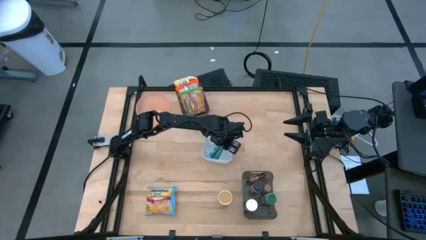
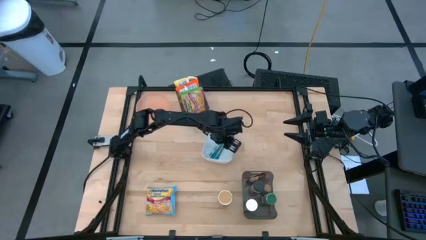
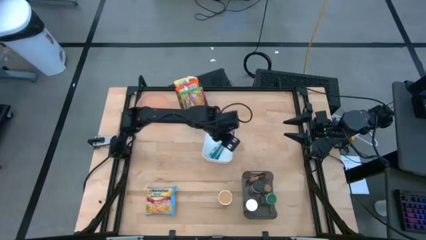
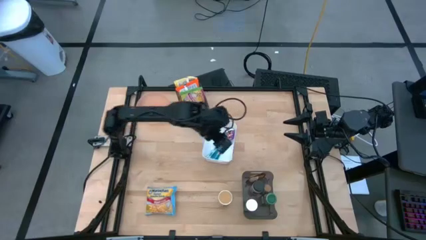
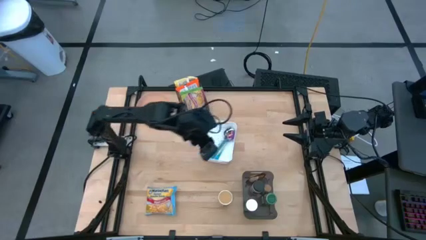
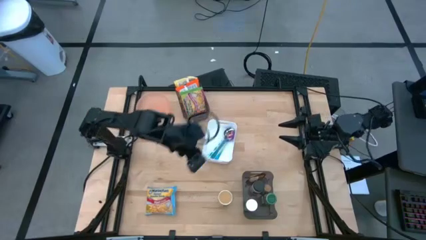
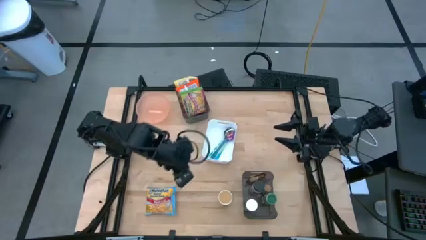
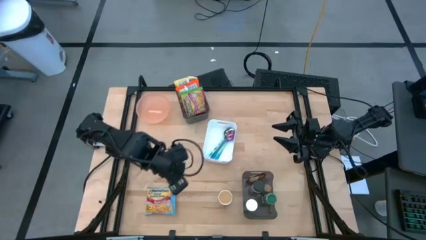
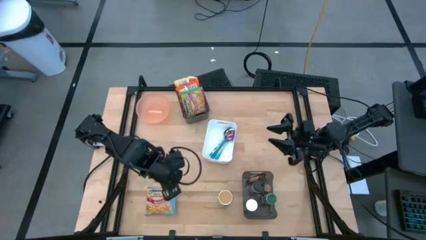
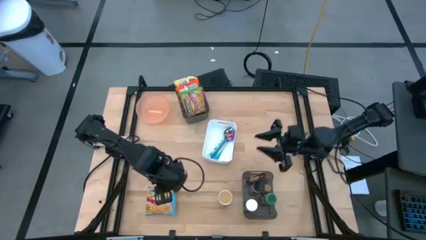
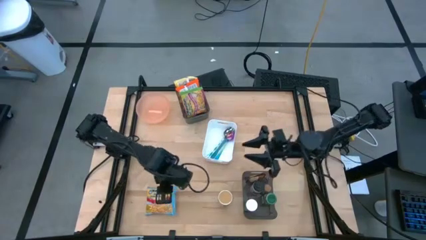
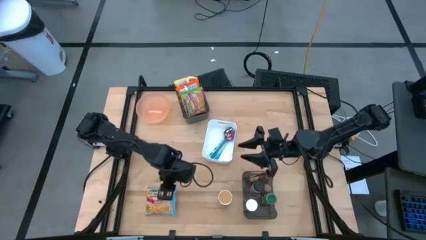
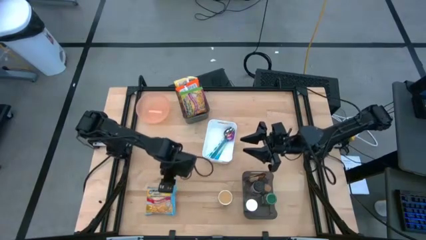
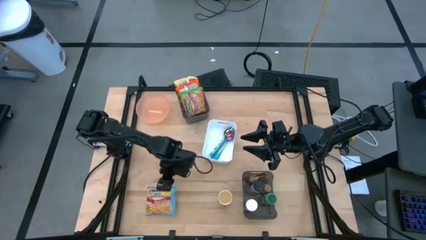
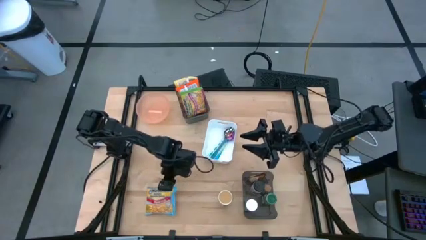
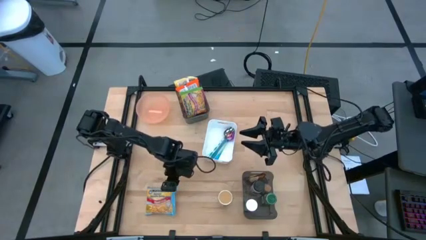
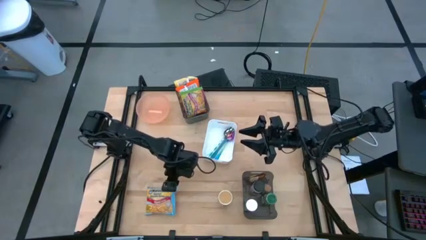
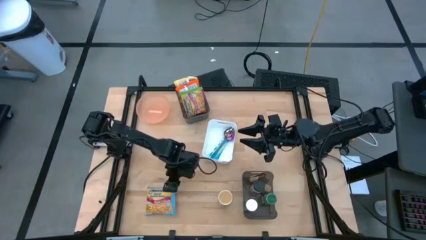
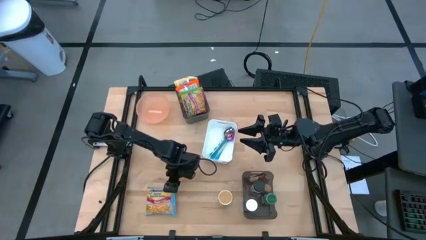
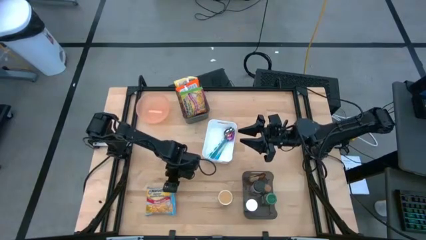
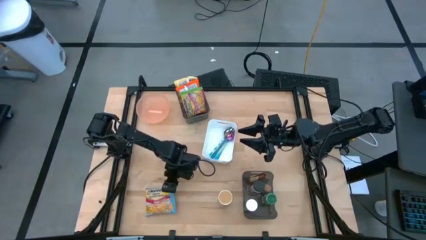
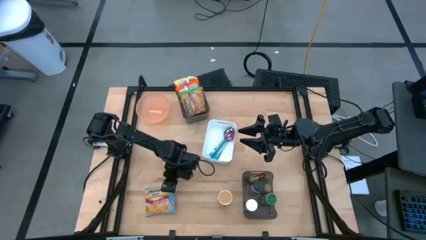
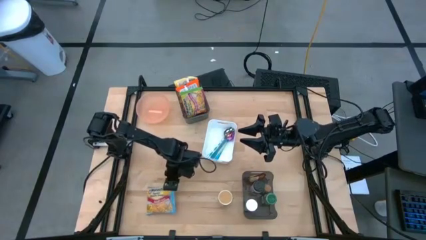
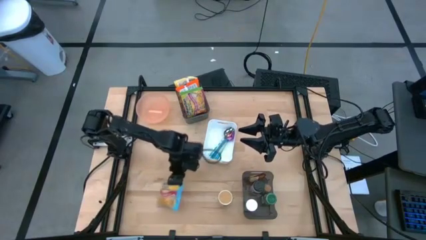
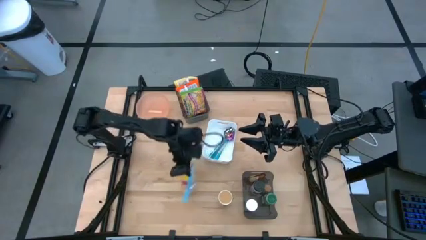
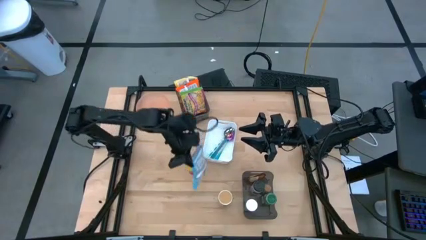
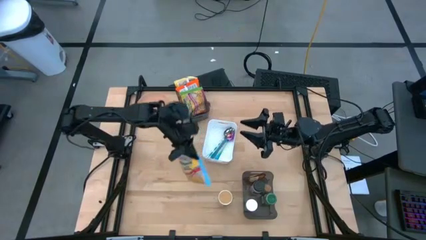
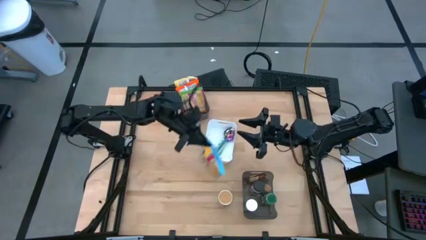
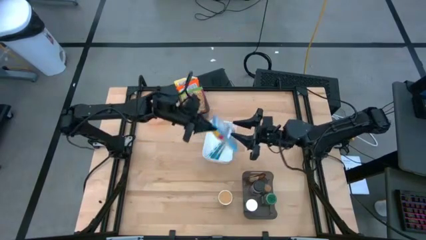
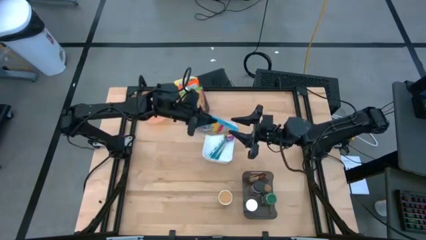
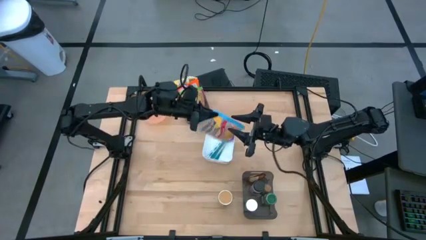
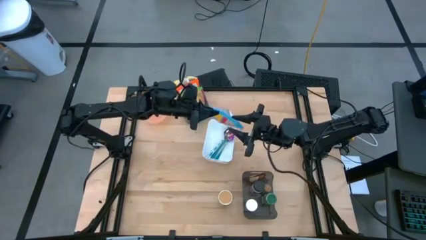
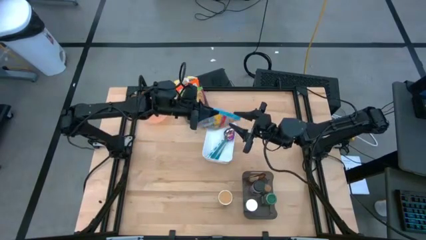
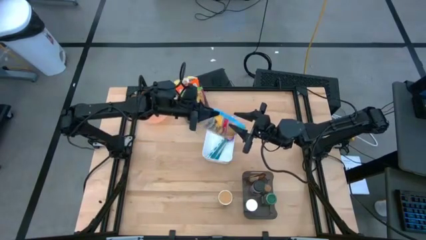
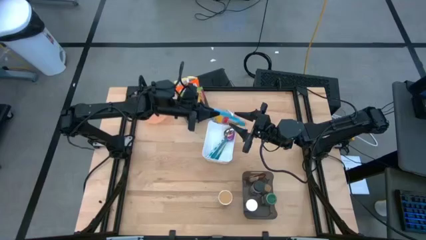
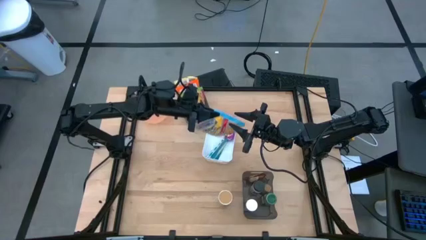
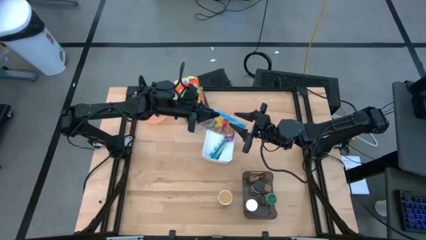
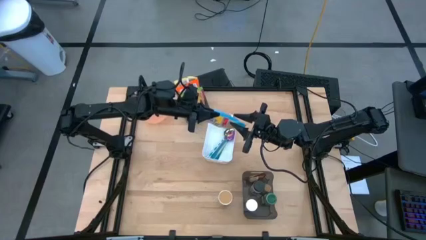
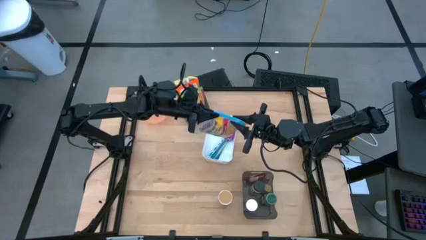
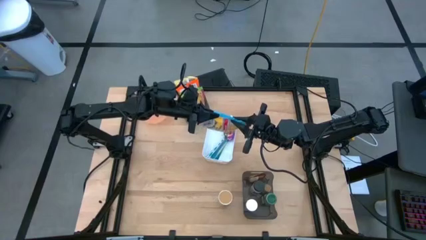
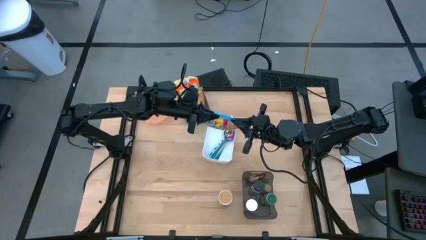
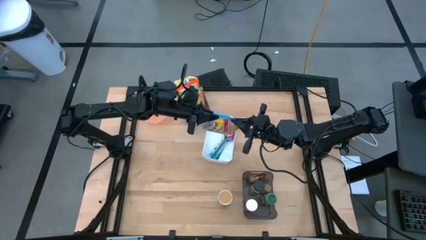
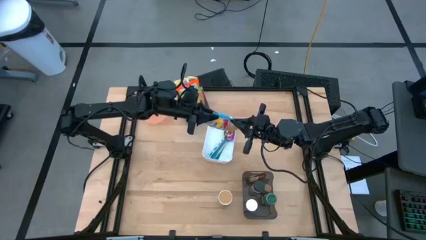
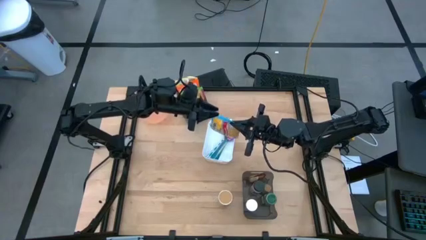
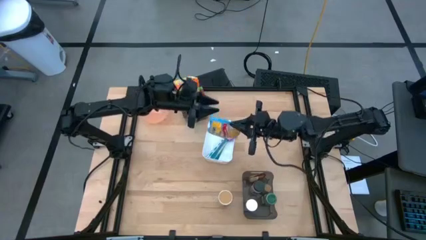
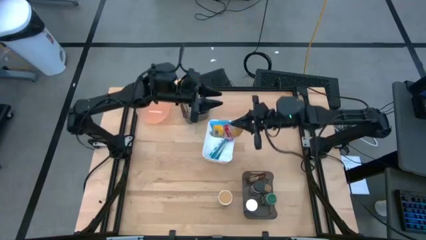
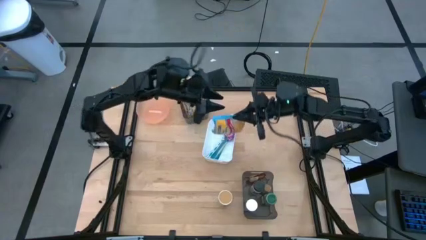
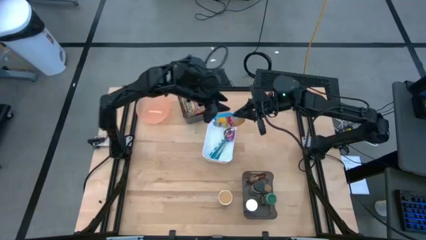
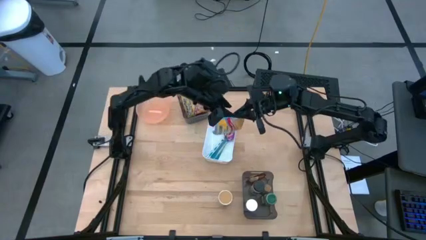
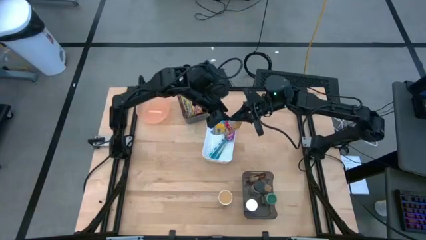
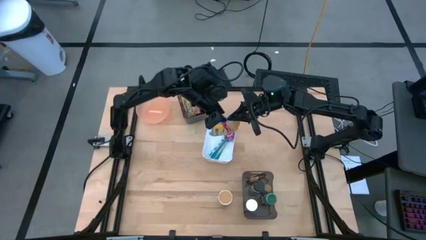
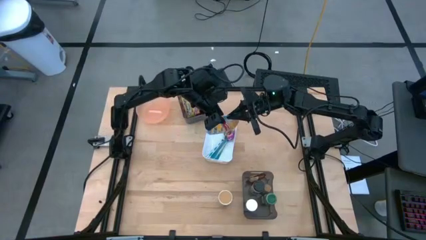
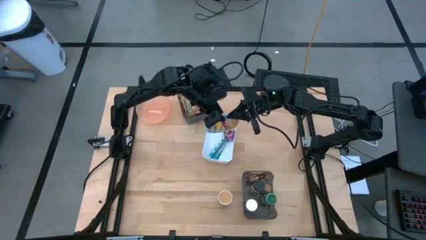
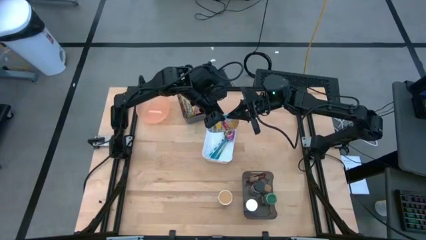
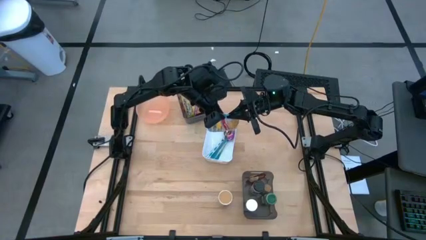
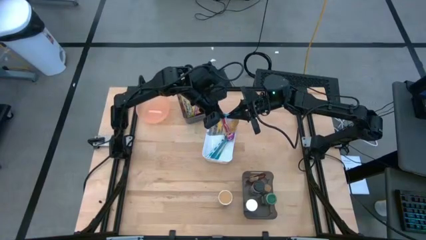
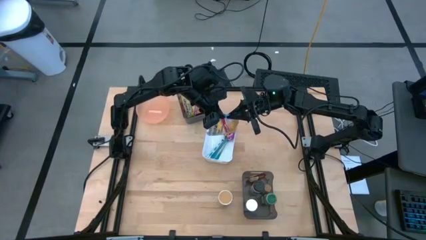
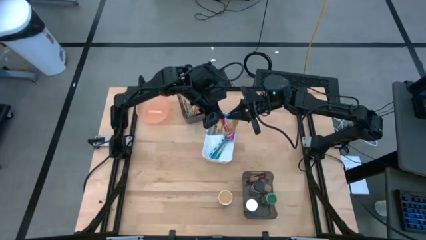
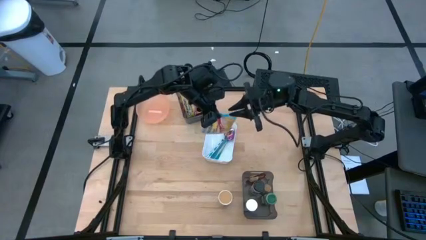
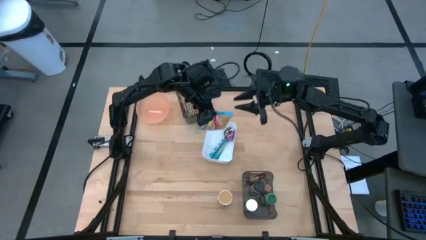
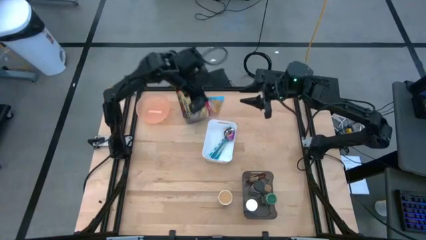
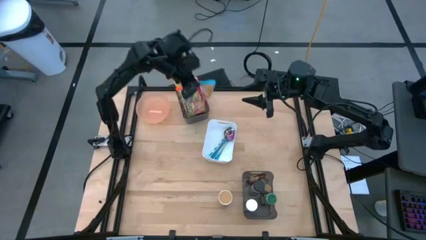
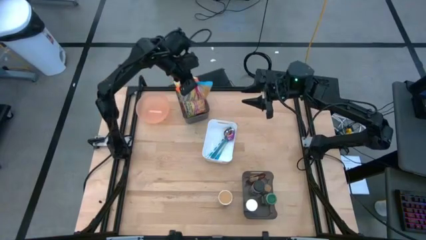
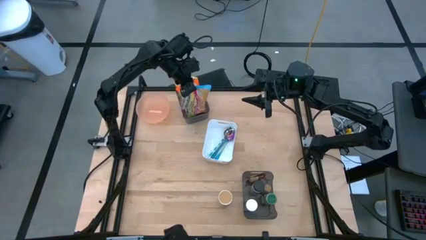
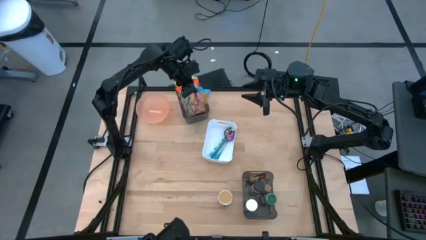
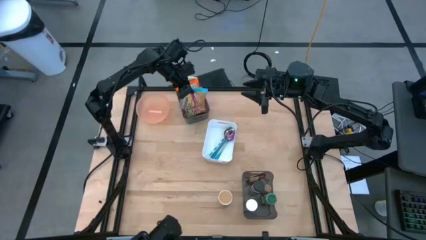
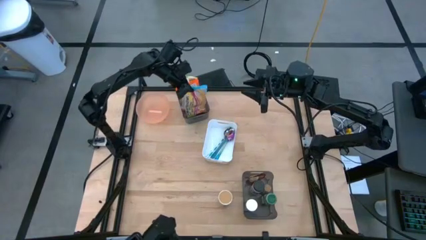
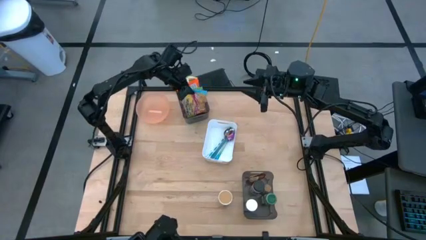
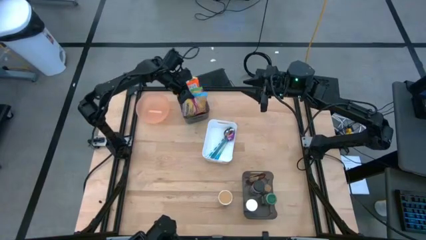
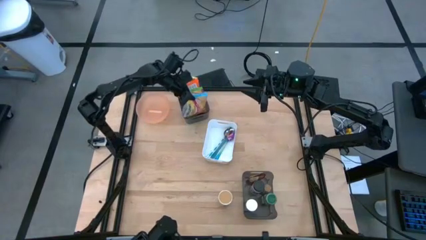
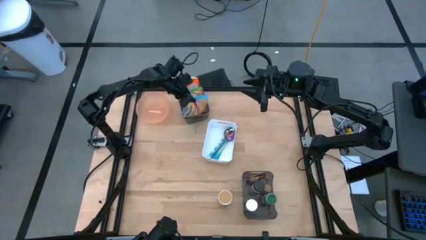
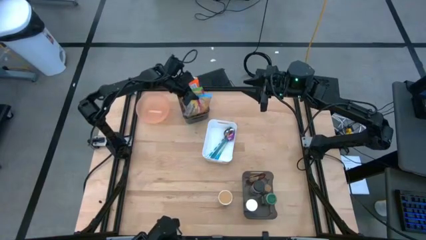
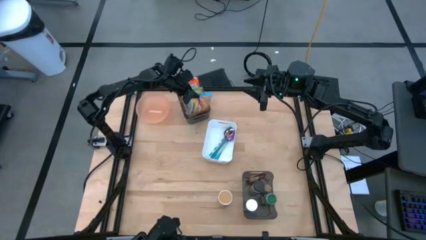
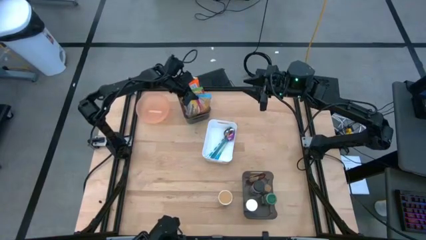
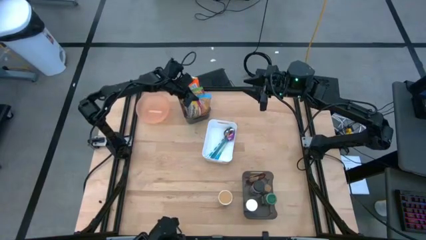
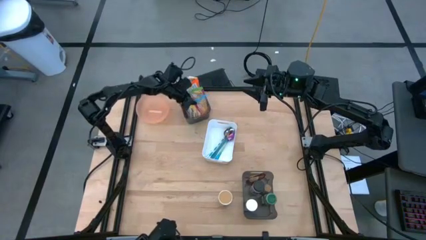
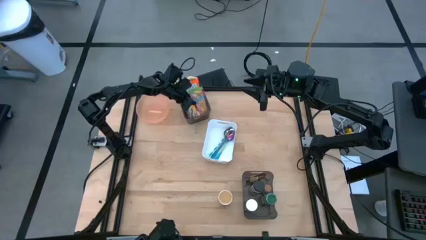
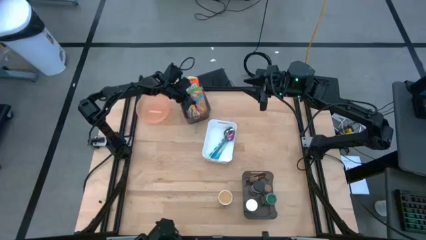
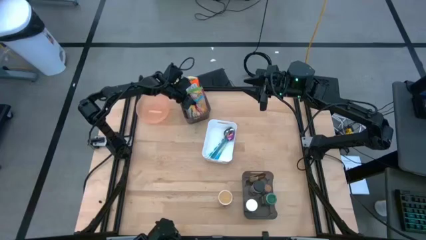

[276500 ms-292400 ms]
Task: Pick & Place Food Item
Put the blue noodle pack into the top black bin

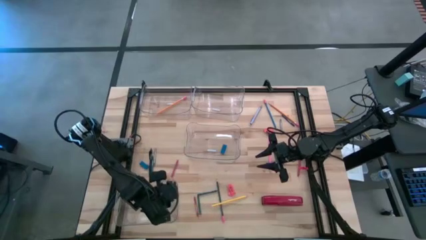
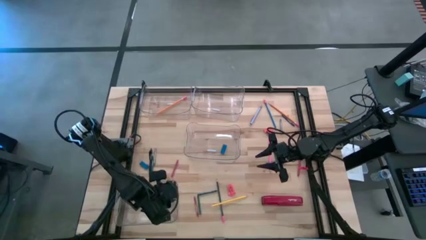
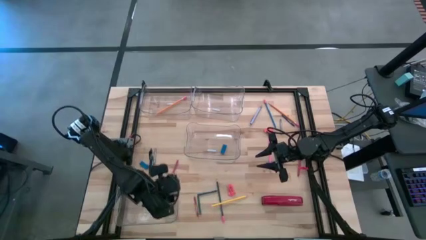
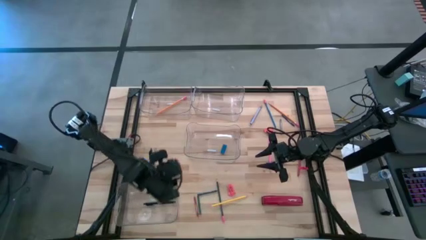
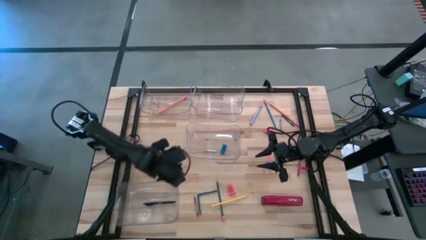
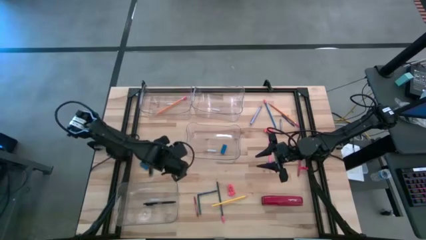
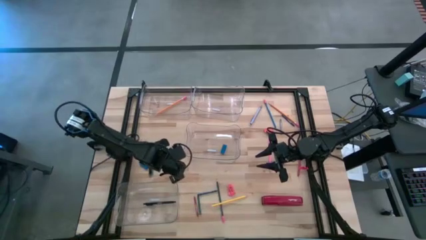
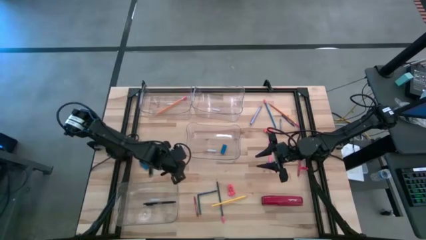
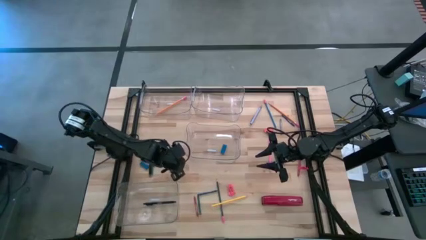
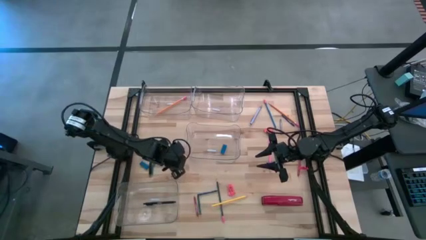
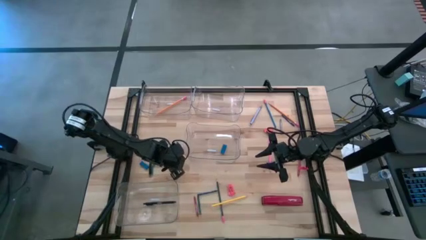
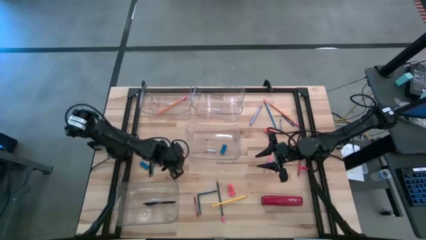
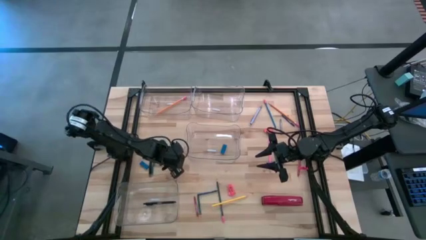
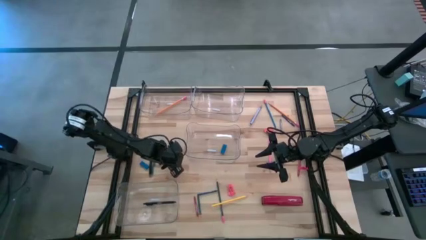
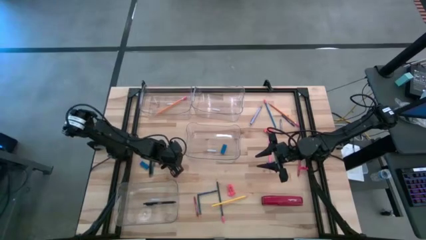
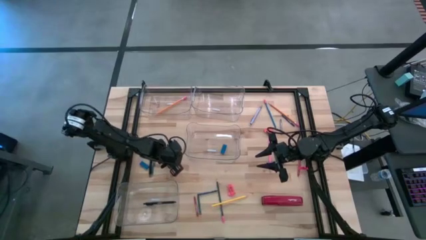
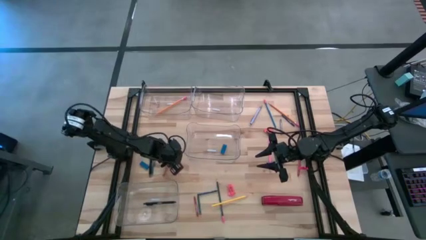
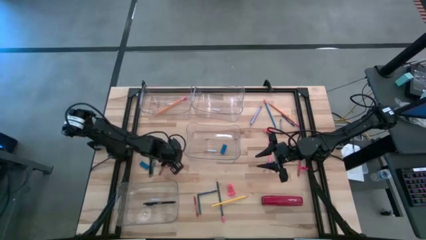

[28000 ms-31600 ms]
Task: Sort crayons/erasers/pens/pencils in bins
Put the top left red crayon into the top right transparent bin
